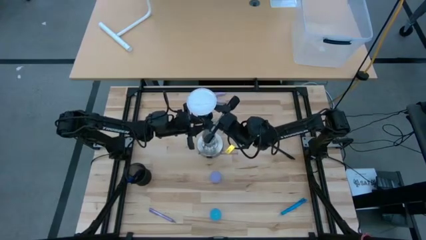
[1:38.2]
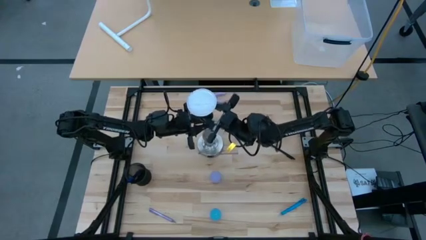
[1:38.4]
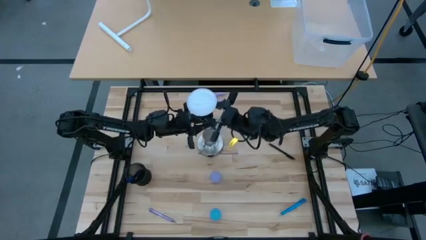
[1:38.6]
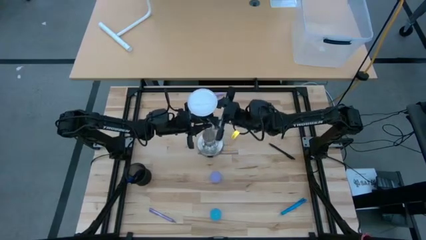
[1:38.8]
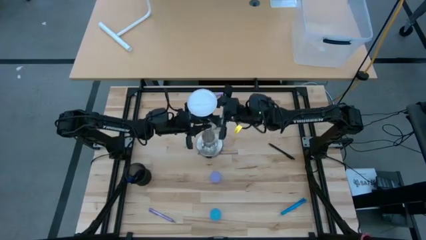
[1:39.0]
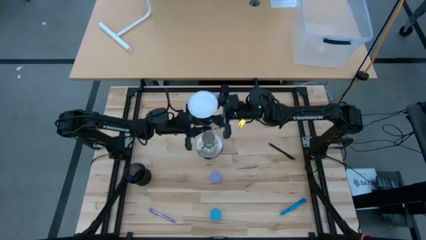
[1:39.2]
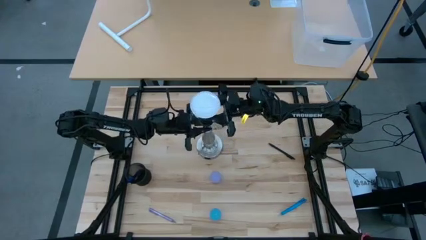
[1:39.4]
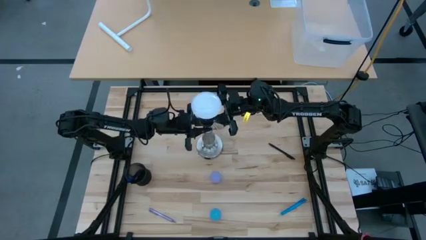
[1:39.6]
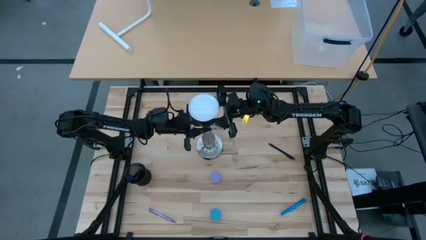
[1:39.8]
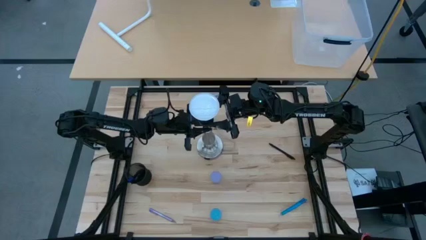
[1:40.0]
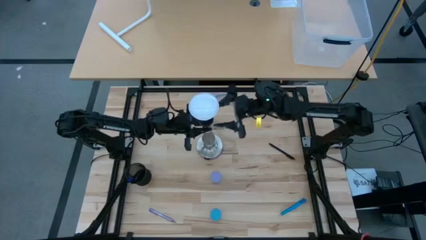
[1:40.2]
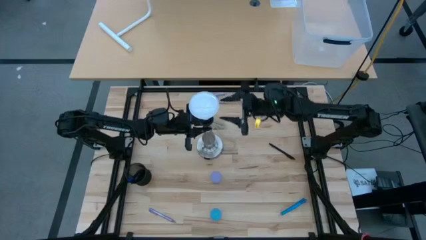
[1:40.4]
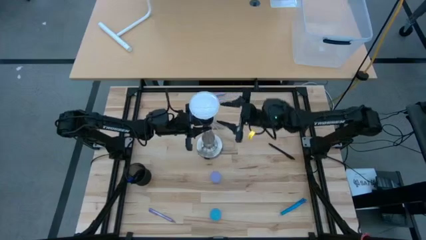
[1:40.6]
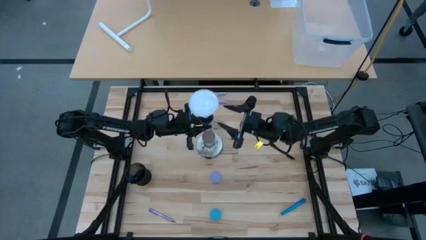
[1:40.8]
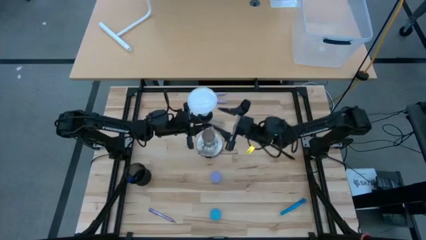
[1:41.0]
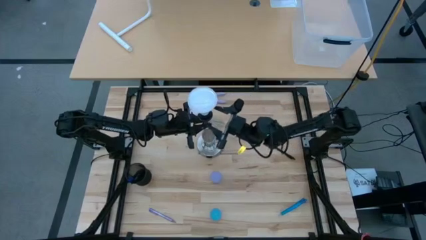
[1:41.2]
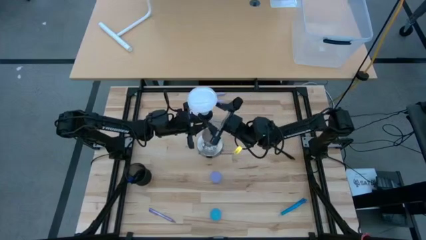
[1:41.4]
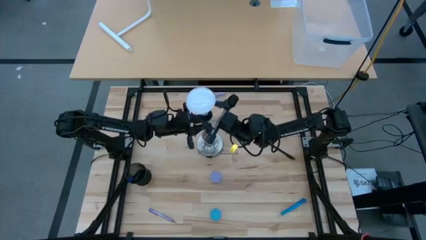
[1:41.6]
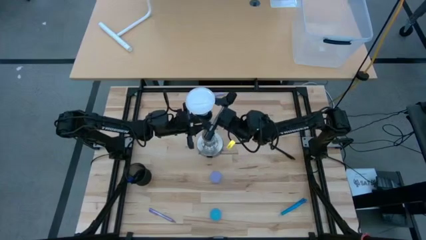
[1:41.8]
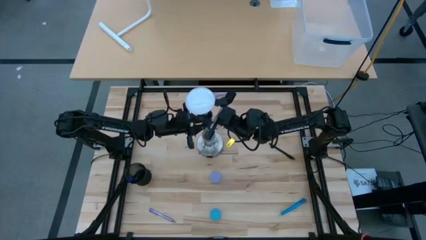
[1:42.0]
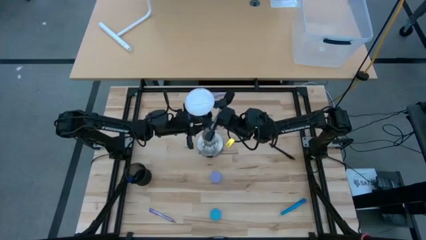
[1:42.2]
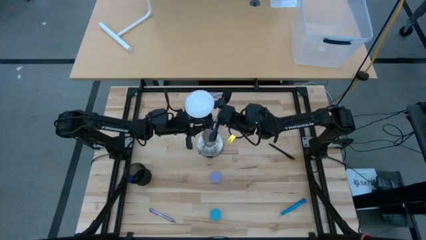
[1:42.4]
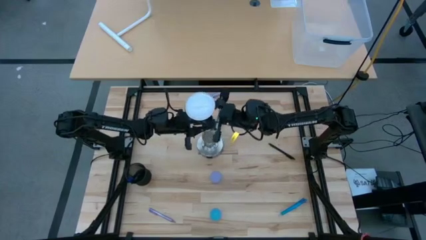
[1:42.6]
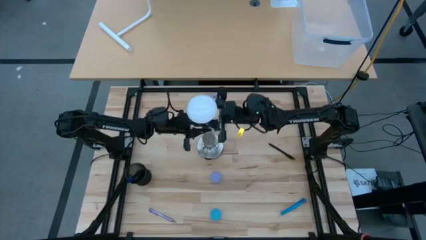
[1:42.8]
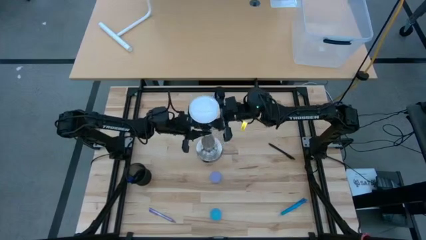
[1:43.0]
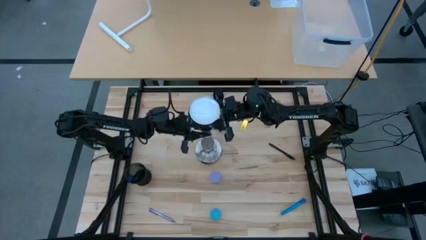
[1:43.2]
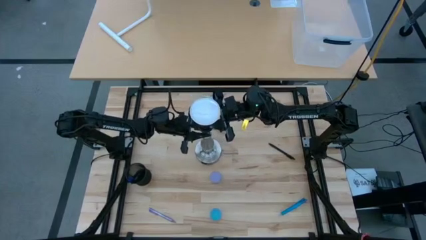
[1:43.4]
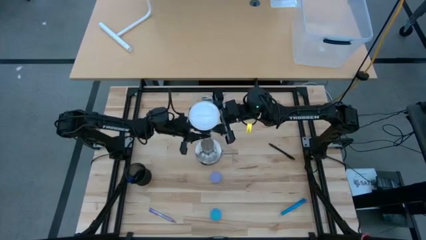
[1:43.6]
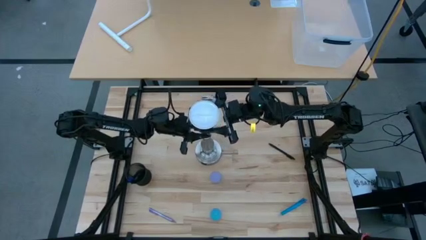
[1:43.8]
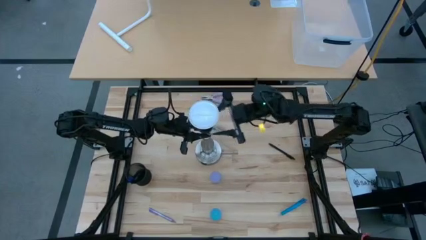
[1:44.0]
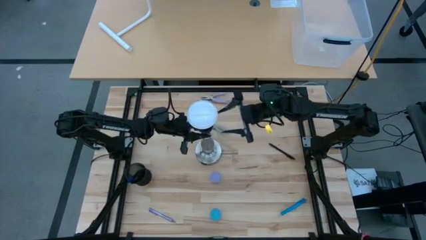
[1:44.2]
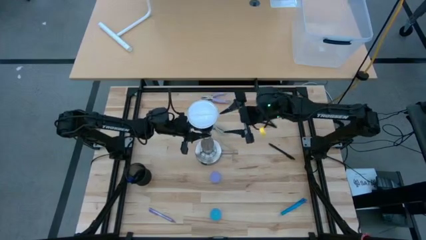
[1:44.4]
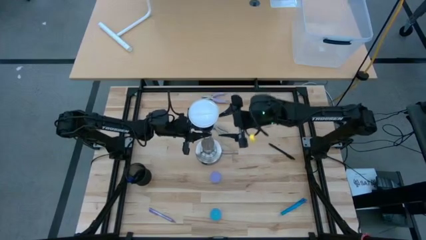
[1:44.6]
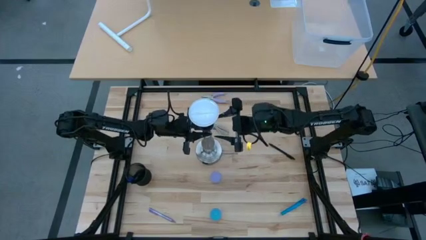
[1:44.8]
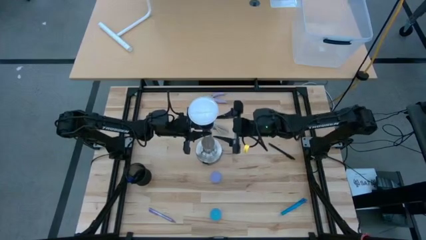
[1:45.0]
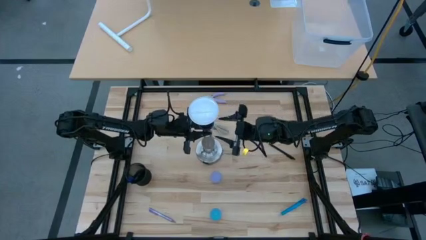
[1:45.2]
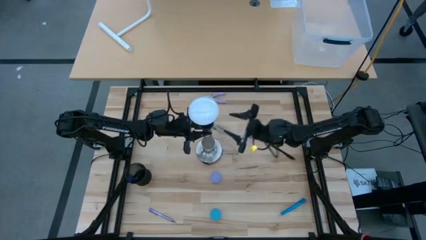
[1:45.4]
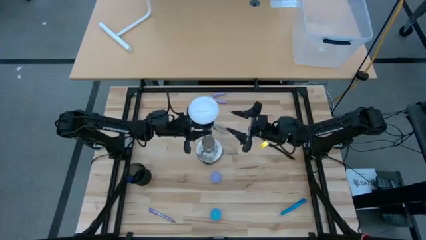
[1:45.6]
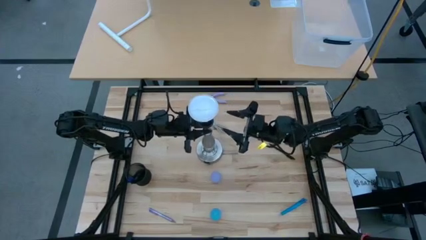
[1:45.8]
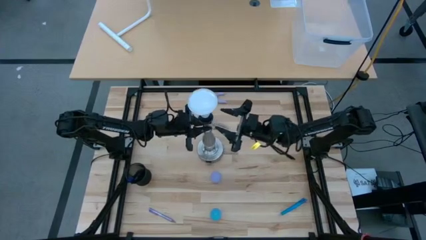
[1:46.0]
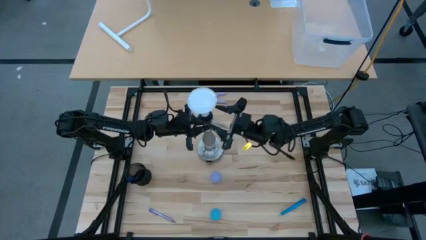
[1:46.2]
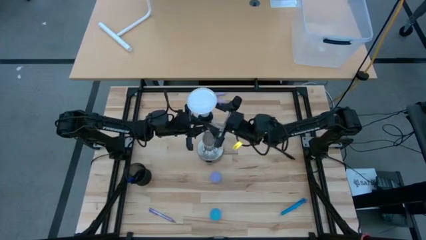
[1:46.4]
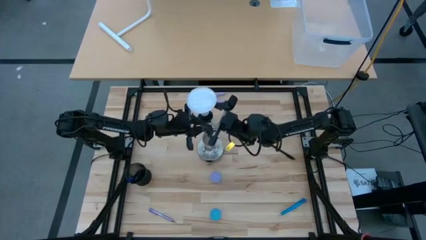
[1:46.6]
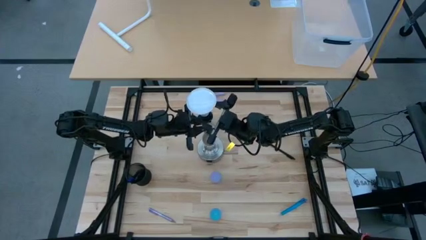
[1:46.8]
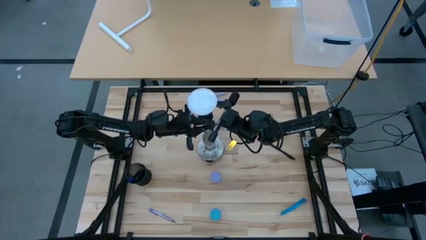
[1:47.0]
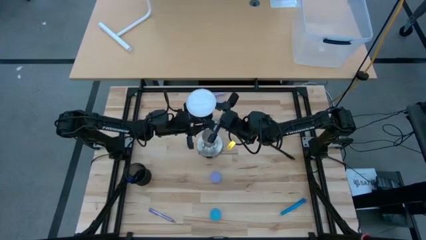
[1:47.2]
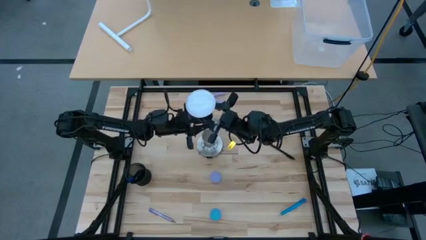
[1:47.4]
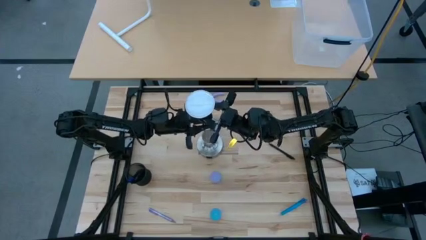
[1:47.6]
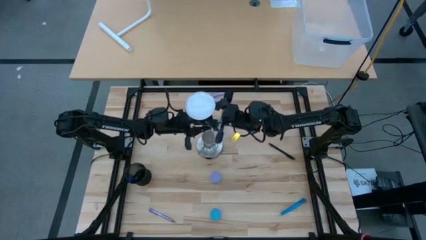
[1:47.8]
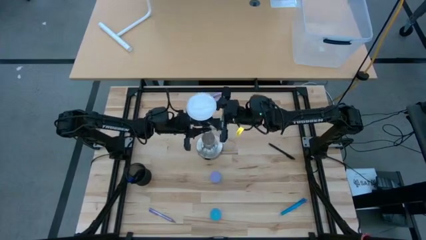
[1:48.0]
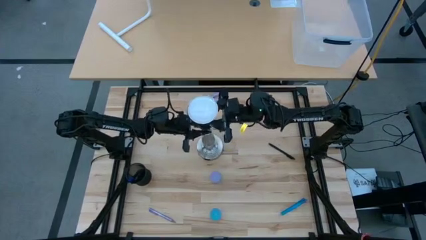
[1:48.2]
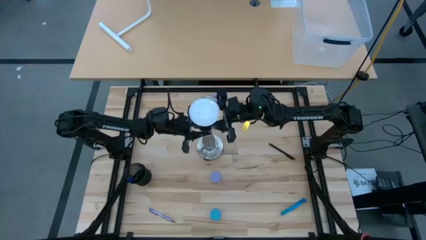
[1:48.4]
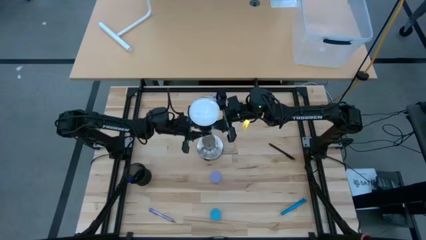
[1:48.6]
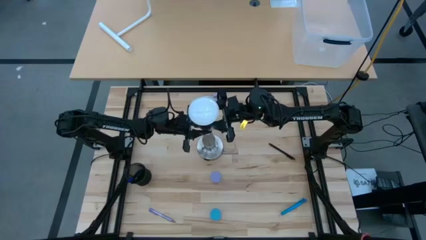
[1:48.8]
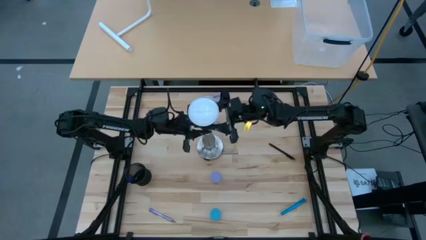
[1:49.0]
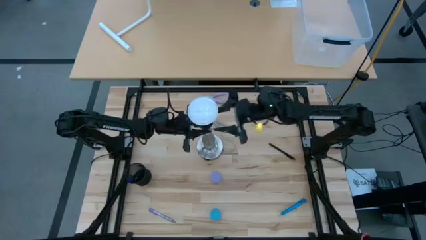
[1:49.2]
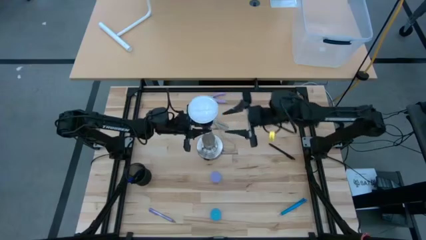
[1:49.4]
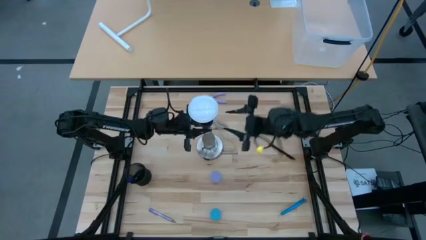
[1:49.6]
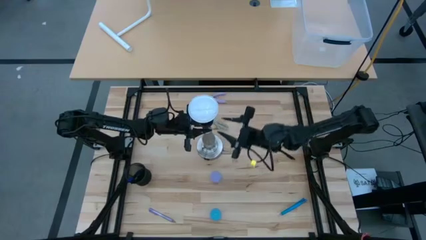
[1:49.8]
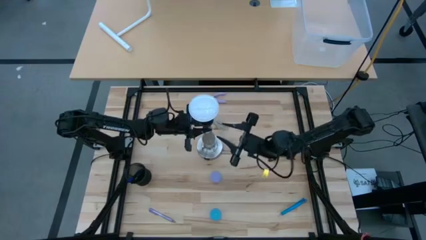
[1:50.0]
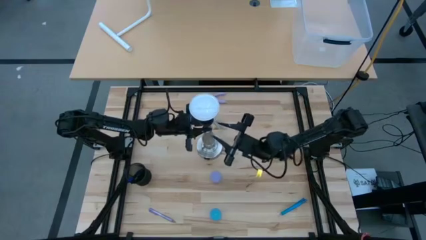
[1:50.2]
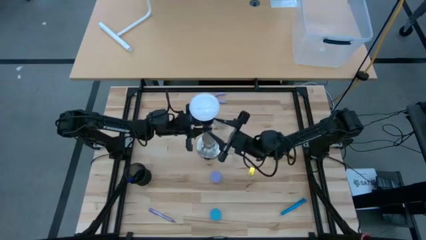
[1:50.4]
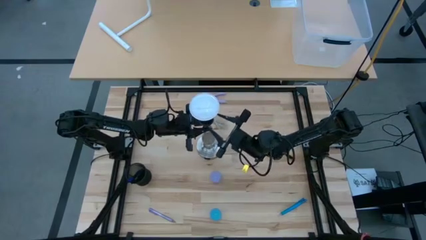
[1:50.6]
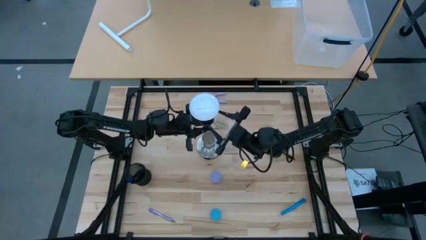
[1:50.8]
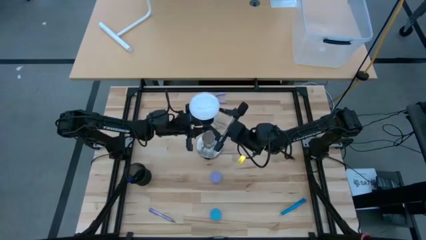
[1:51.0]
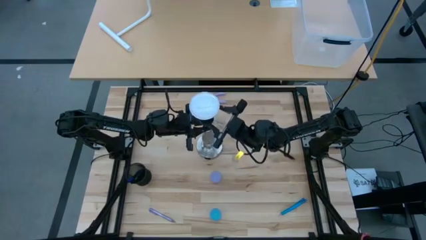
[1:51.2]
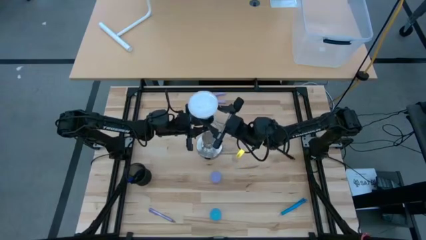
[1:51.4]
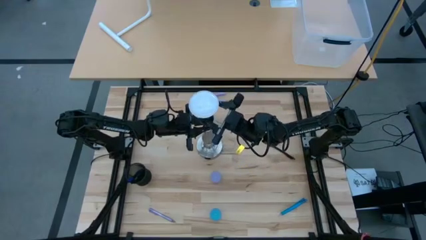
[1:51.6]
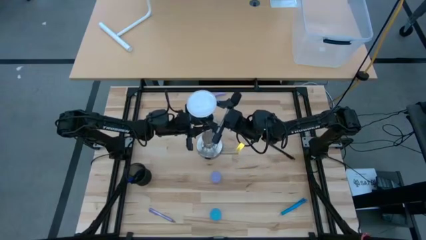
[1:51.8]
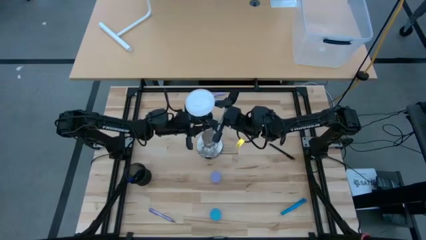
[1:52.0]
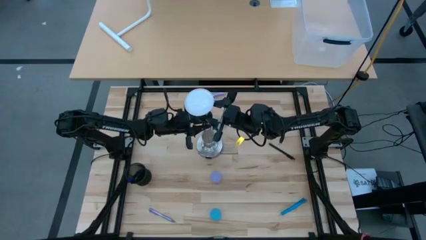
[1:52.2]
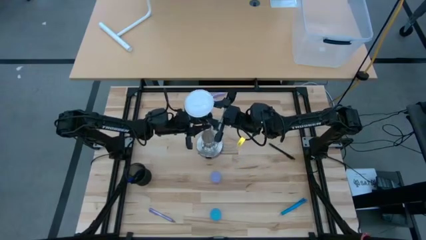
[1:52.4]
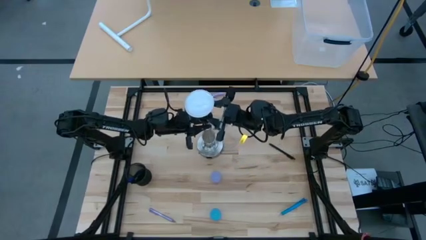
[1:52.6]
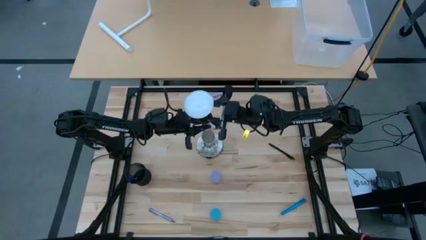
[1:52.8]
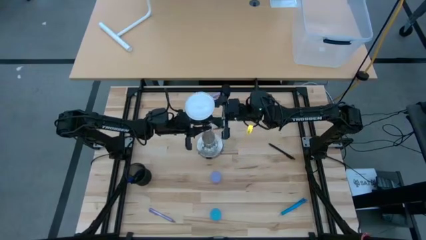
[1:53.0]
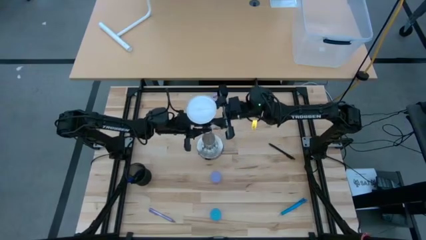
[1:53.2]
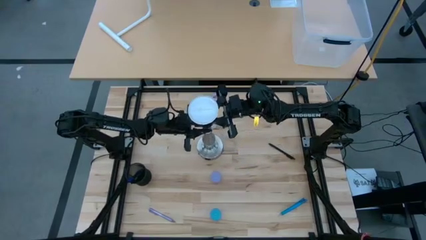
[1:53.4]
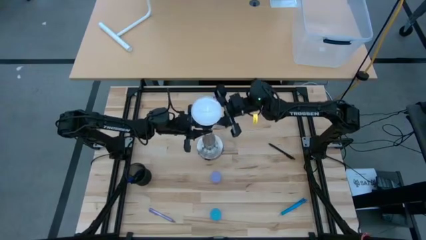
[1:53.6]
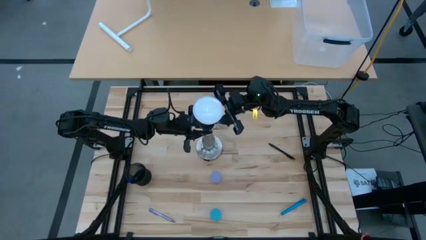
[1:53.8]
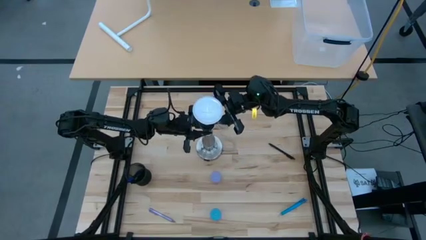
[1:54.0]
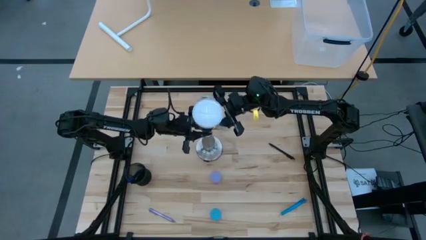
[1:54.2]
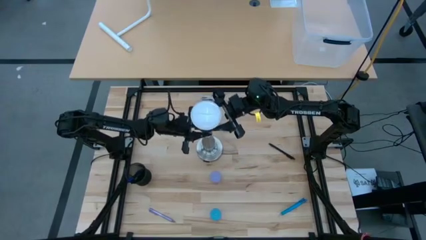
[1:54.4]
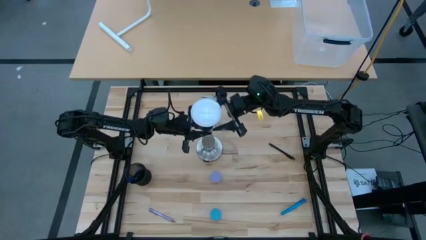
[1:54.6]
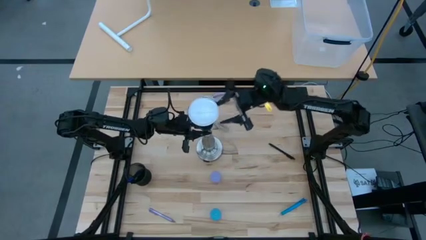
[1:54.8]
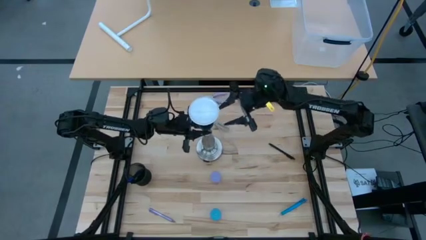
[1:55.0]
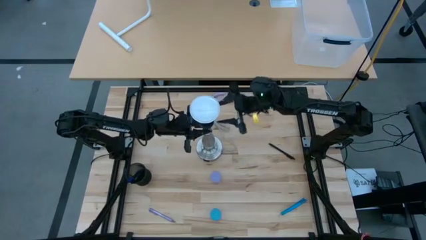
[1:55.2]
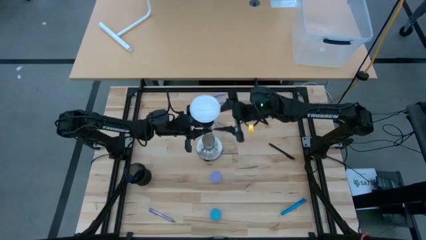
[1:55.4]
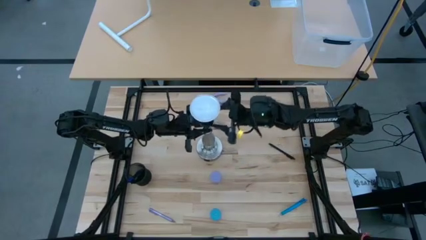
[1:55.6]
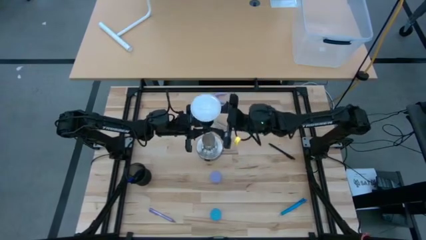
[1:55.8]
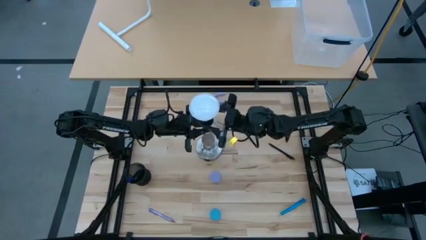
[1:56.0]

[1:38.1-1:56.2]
Task: Screw lightbulb
Remove the lightbulb from the silver lamp socket
